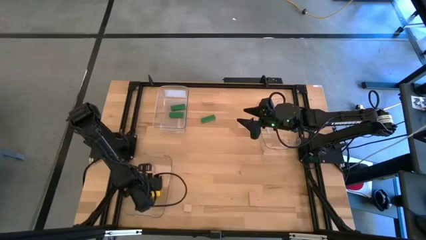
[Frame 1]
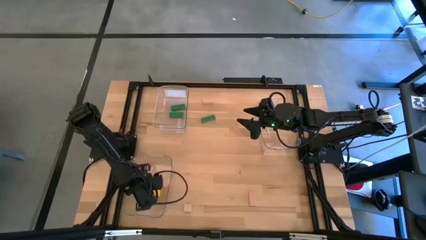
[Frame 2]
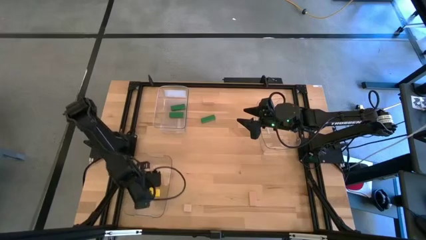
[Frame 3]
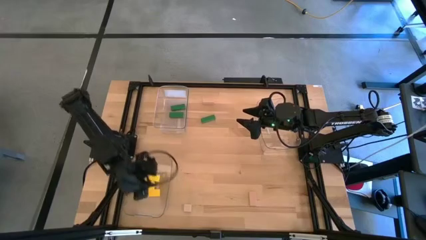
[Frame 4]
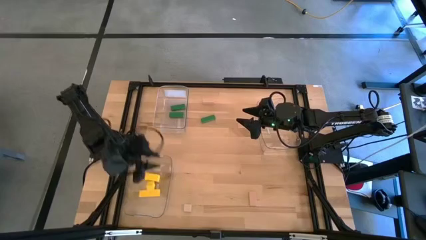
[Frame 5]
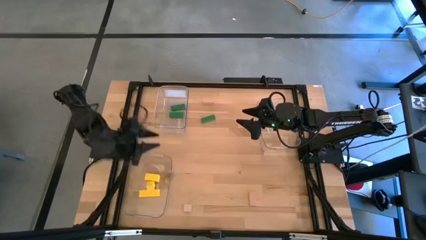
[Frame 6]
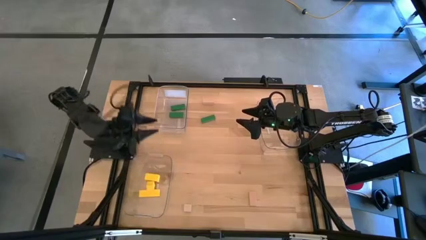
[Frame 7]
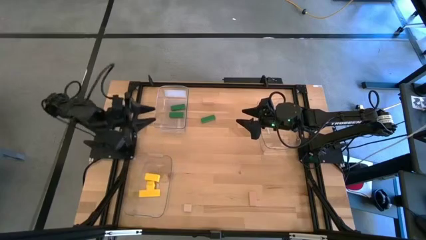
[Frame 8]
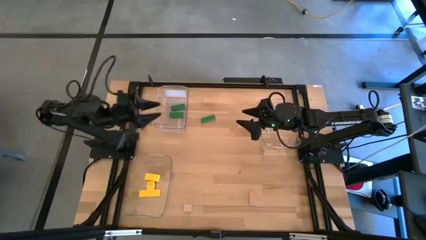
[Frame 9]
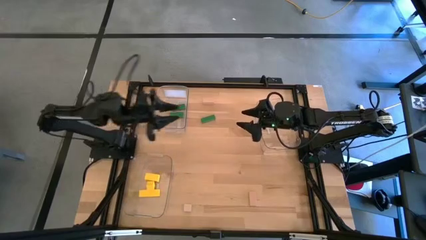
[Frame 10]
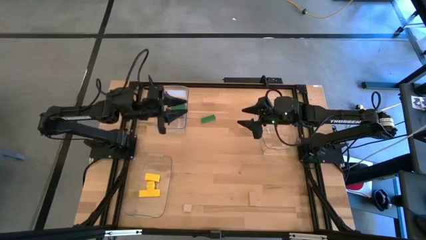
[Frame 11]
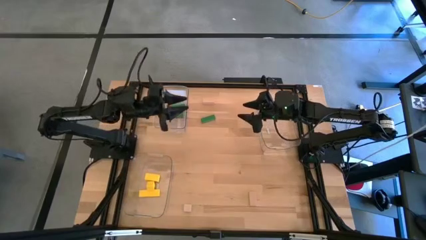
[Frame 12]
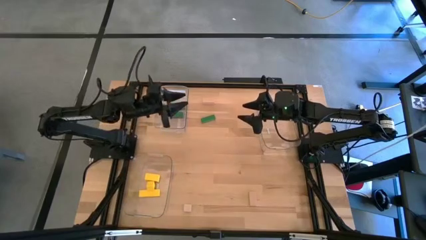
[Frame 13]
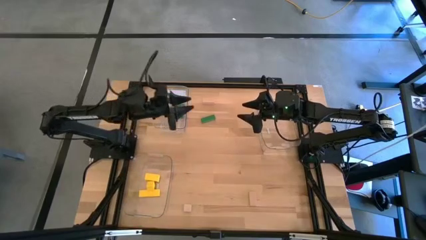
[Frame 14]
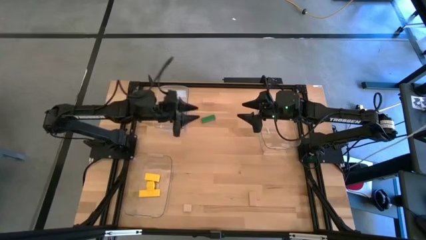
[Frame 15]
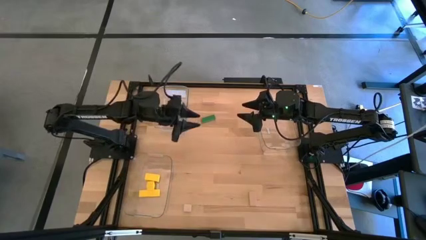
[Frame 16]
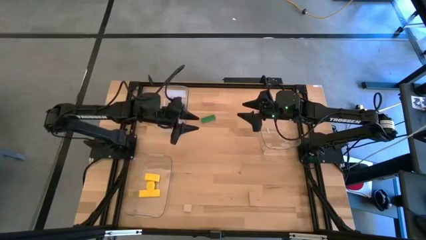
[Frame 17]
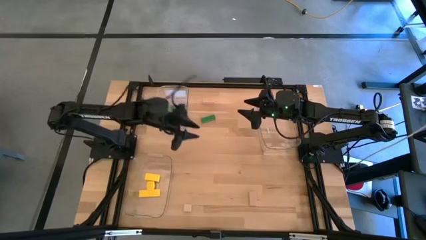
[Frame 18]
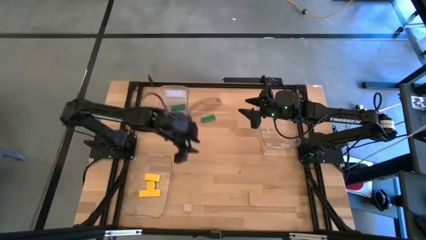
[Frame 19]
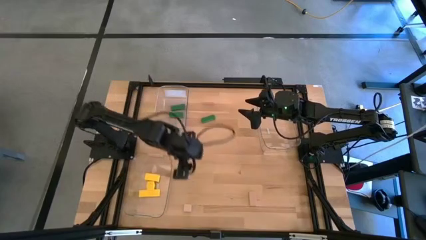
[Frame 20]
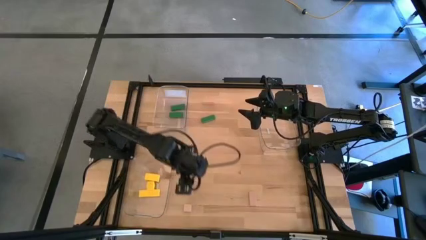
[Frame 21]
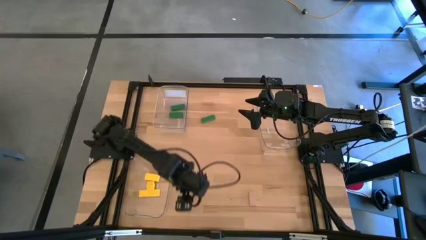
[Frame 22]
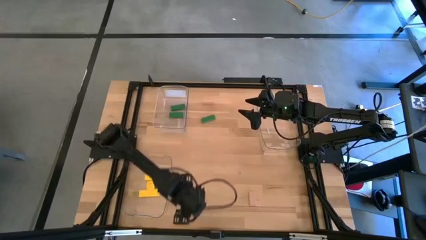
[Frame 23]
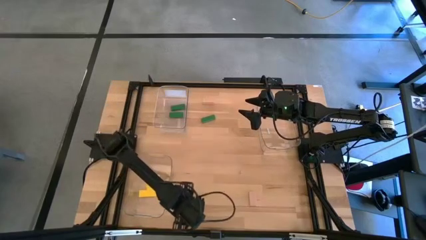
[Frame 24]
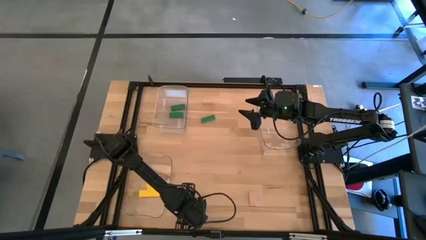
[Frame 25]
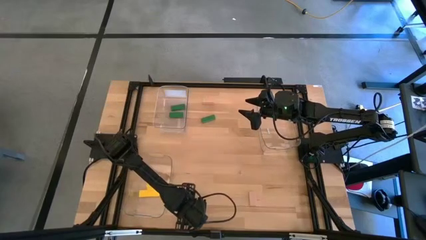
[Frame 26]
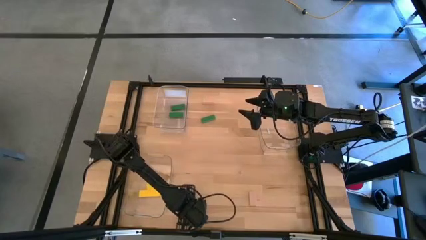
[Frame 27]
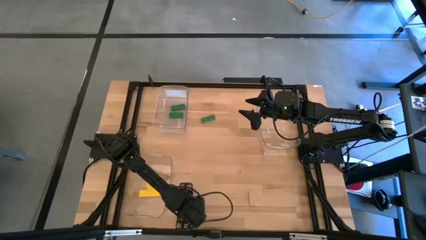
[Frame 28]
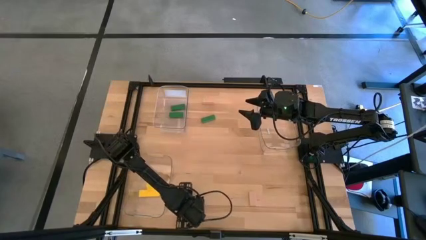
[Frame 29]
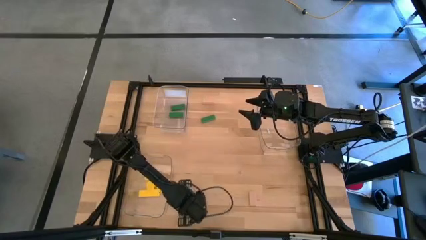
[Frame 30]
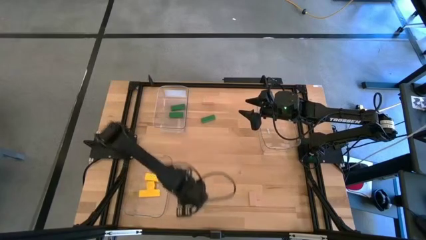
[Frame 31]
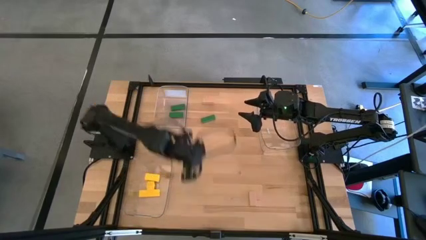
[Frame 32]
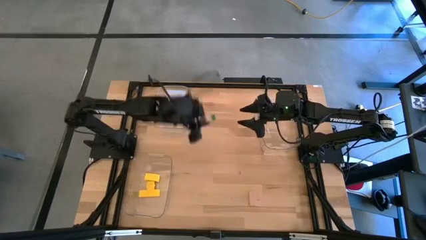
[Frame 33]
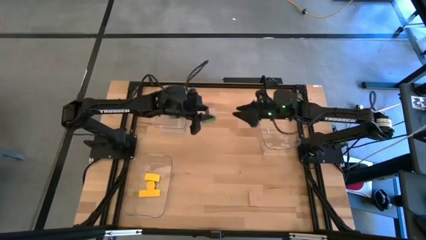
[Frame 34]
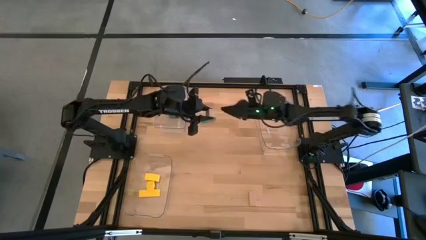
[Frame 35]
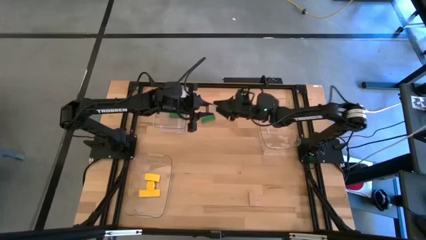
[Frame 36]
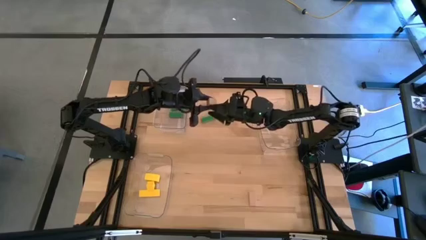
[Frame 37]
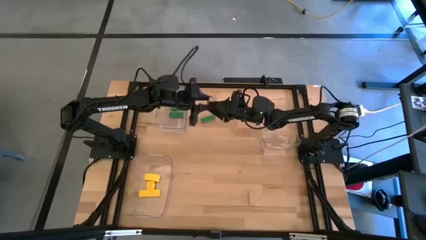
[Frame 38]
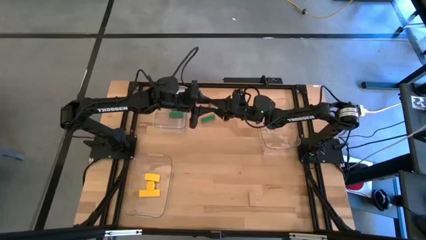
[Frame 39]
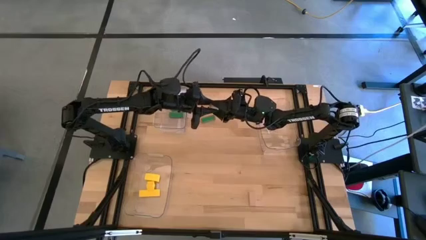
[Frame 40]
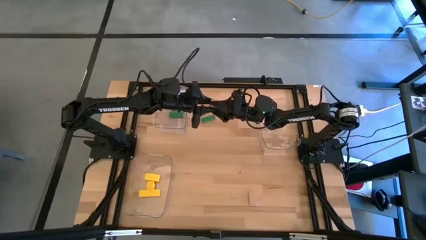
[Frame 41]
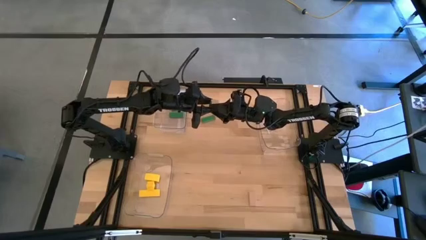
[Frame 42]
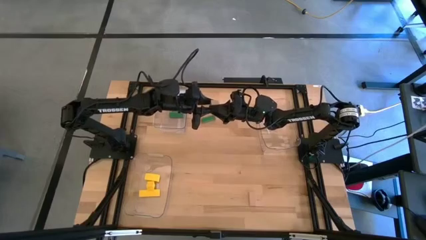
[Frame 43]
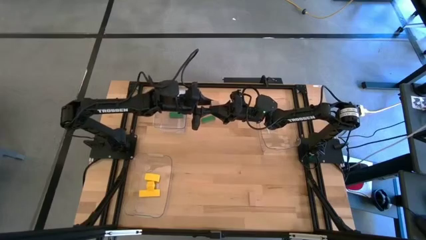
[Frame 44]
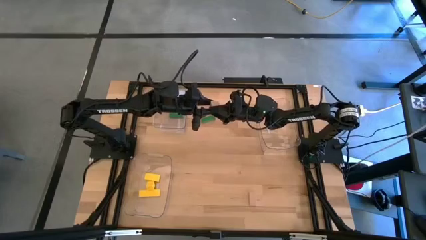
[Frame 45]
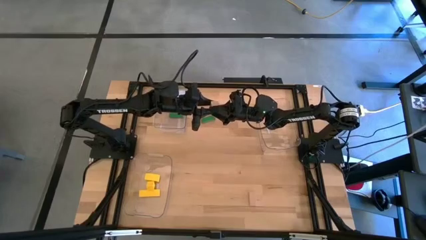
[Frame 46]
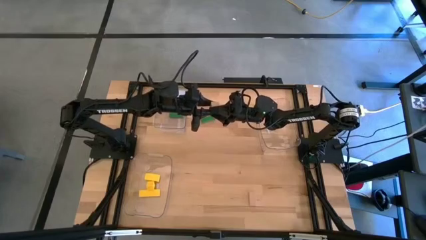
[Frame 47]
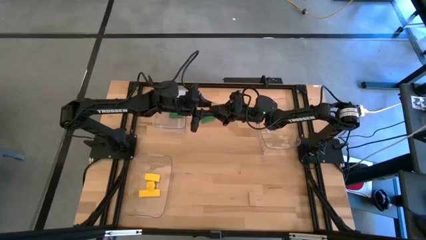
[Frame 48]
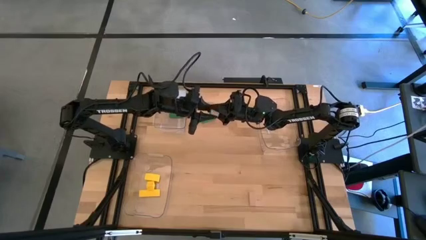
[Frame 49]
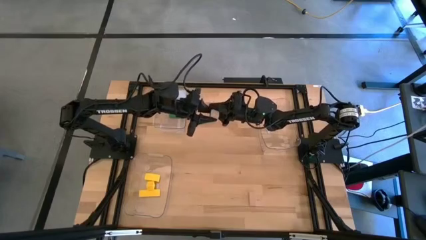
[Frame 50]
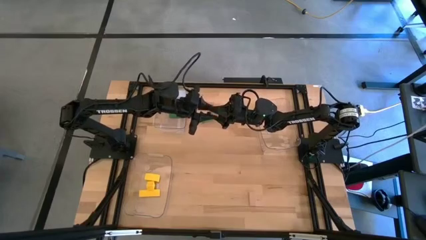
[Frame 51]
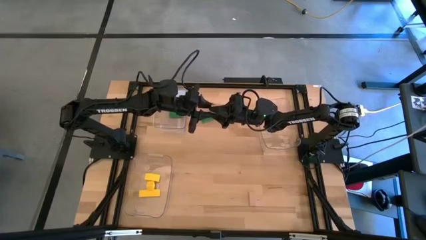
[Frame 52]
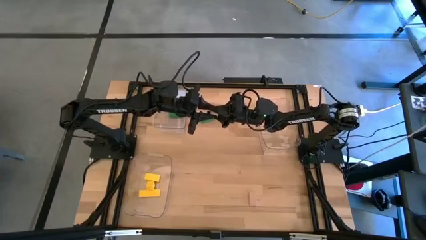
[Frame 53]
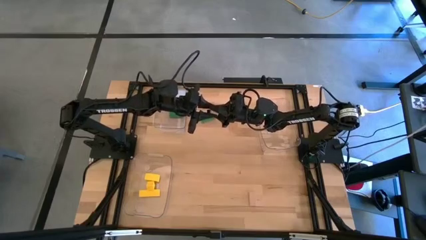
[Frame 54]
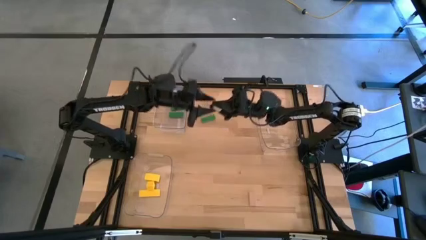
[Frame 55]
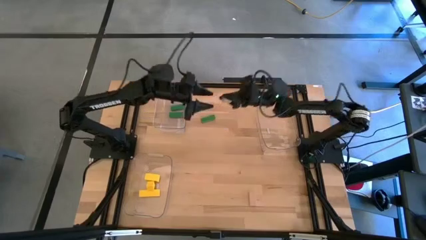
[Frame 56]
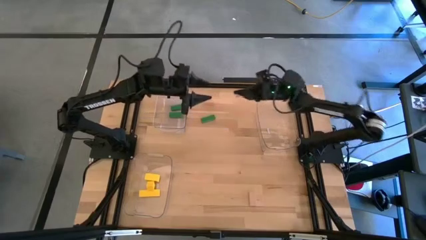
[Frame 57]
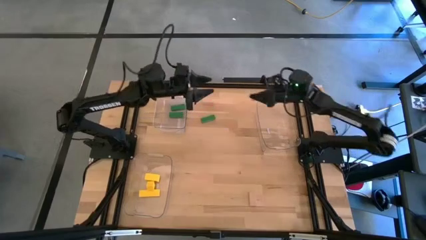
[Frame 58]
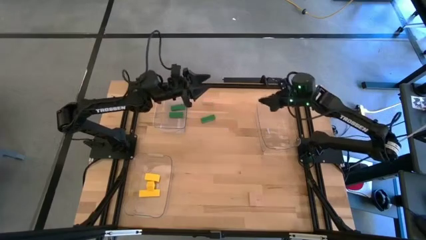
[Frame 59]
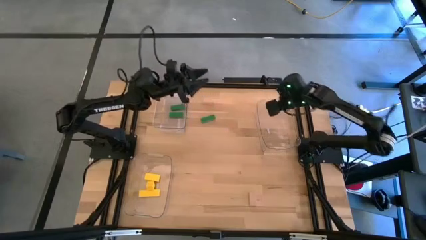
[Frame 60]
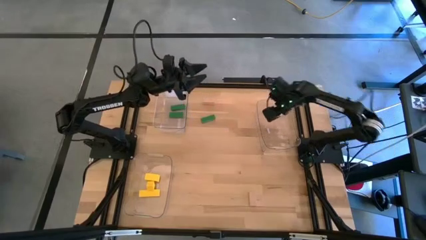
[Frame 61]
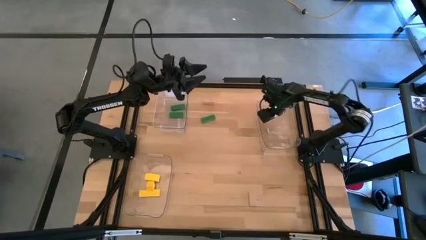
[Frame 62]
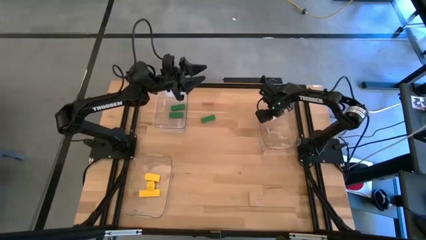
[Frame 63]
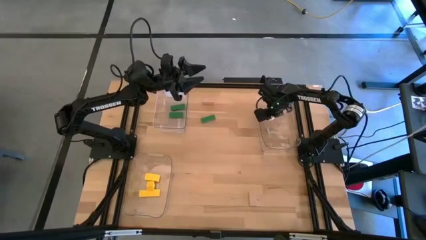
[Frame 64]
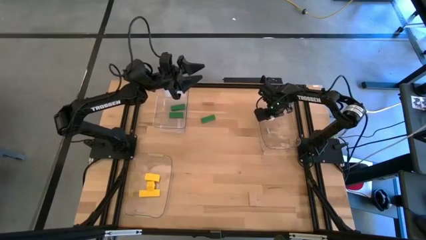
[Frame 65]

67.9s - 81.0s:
Task: Sort & place blocks by color
Put the bottom left brown block into the top right transparent bin
